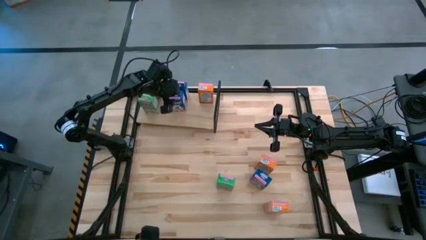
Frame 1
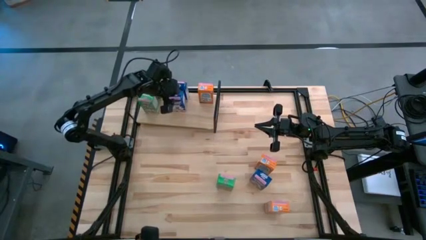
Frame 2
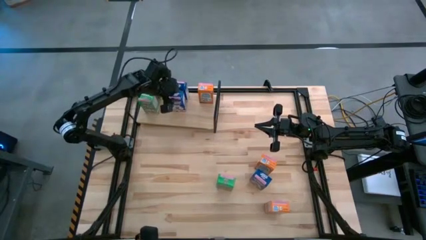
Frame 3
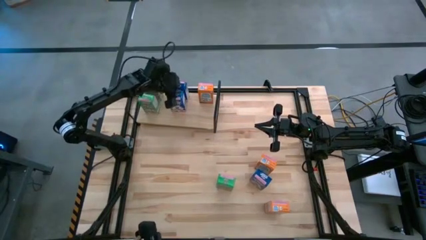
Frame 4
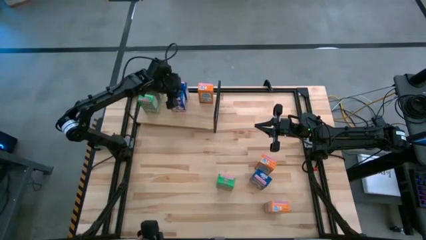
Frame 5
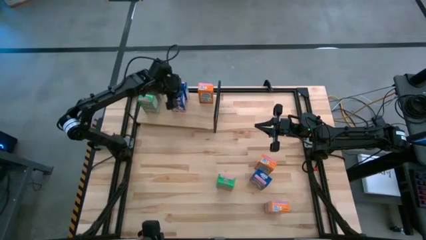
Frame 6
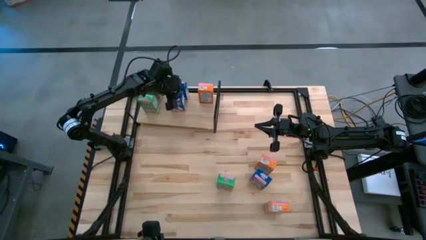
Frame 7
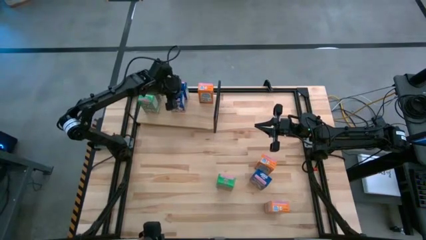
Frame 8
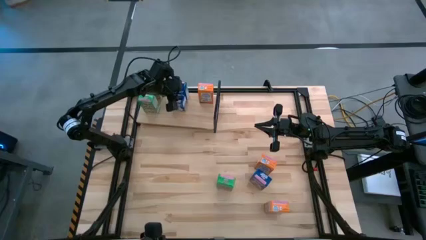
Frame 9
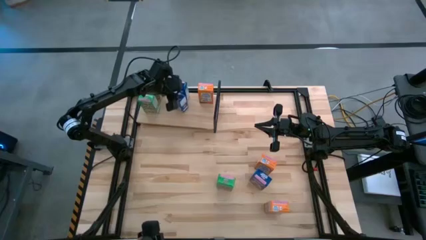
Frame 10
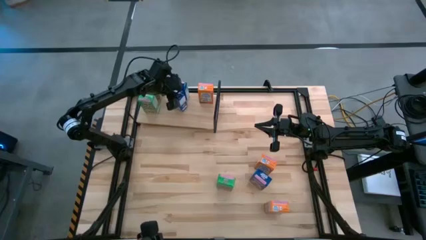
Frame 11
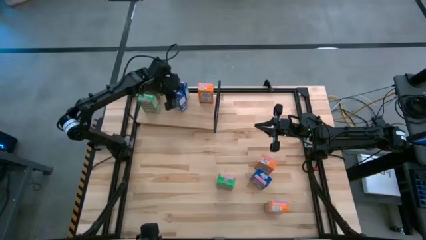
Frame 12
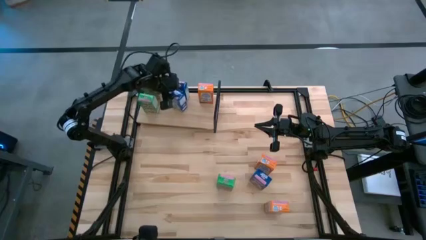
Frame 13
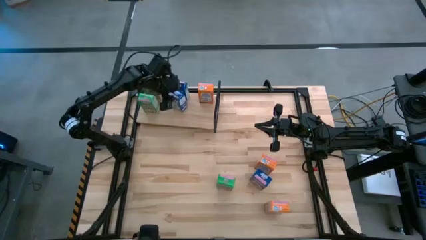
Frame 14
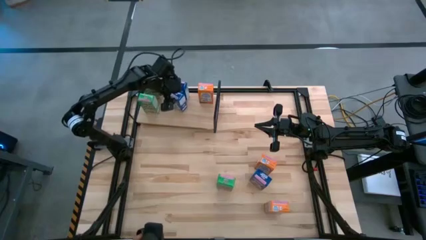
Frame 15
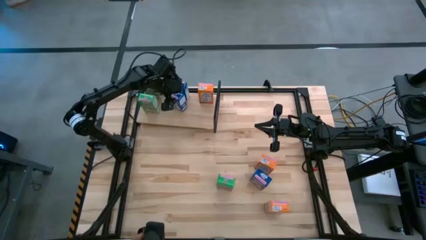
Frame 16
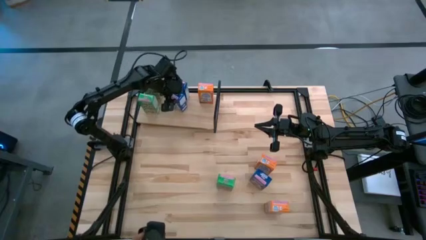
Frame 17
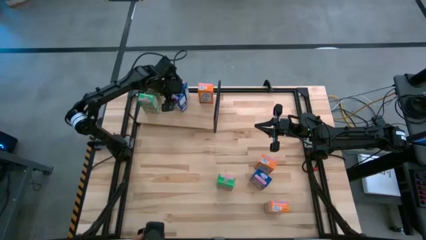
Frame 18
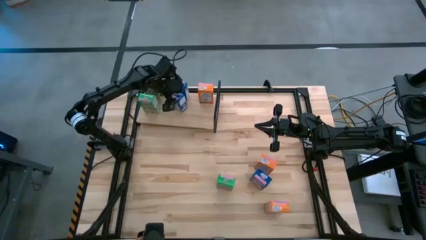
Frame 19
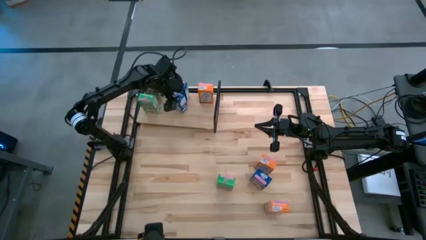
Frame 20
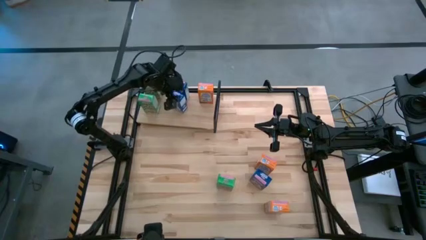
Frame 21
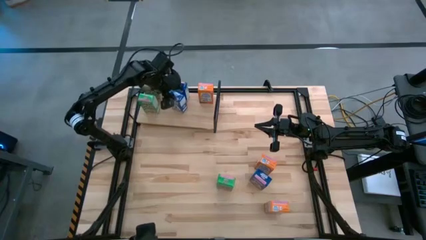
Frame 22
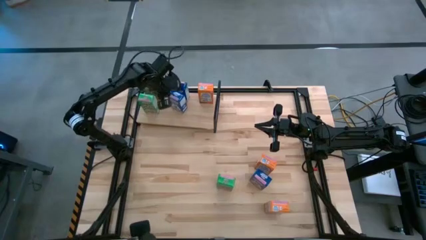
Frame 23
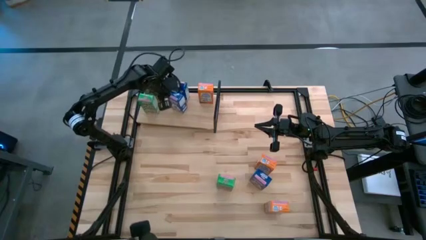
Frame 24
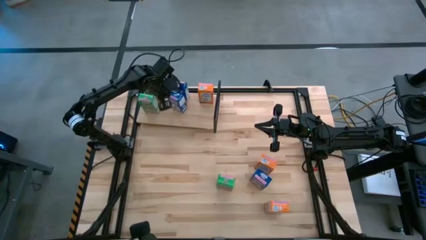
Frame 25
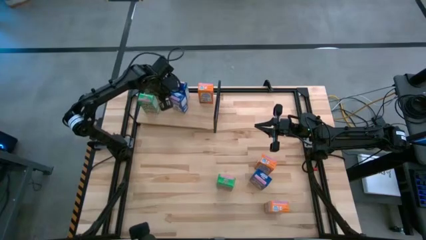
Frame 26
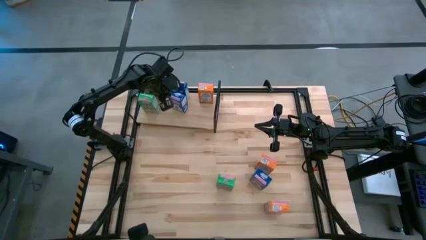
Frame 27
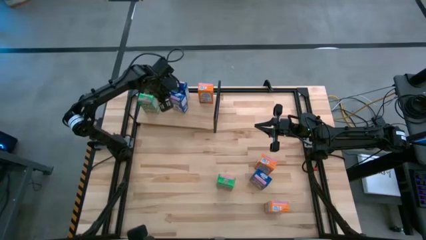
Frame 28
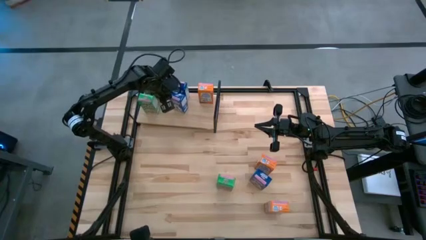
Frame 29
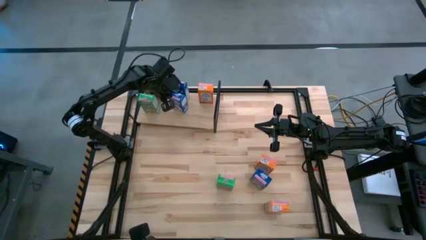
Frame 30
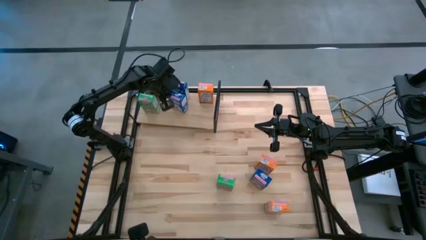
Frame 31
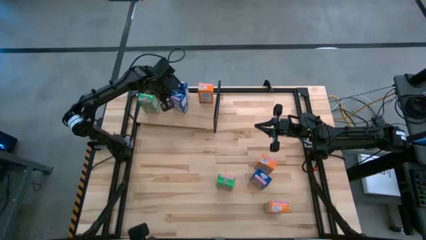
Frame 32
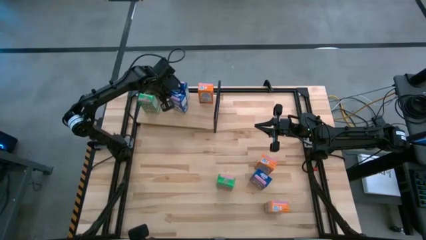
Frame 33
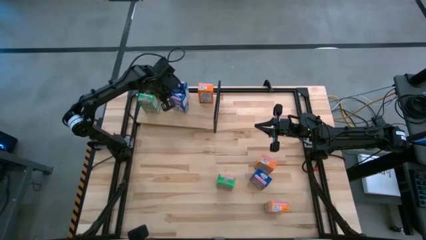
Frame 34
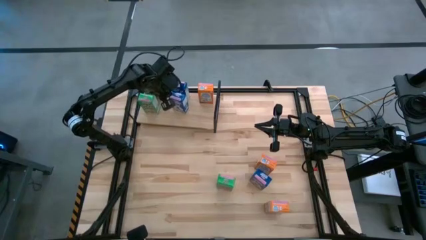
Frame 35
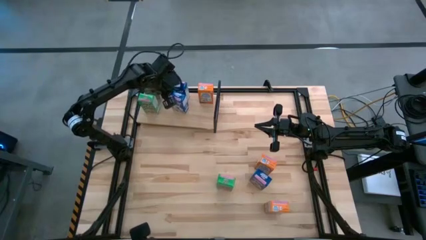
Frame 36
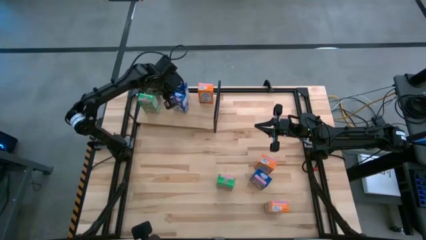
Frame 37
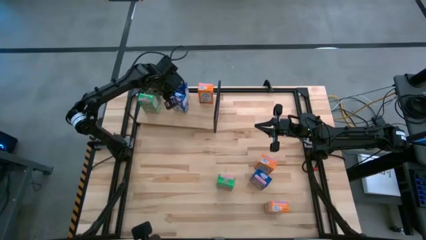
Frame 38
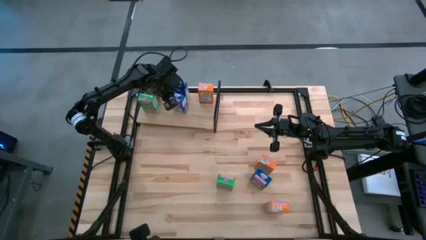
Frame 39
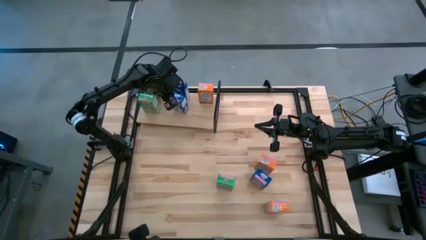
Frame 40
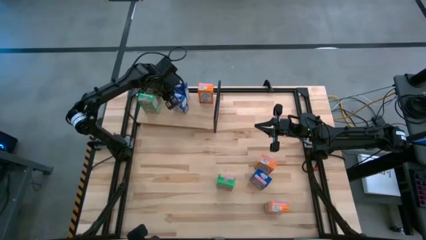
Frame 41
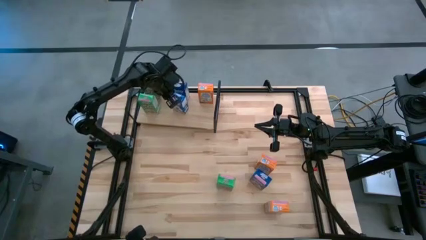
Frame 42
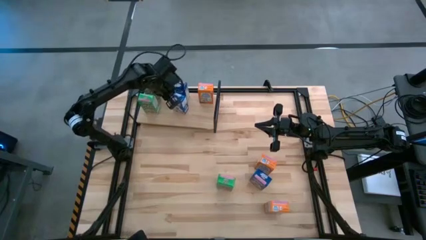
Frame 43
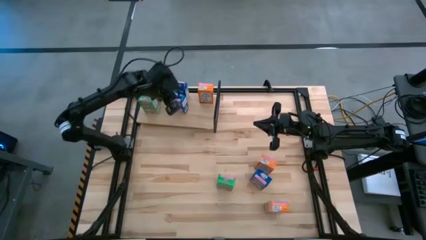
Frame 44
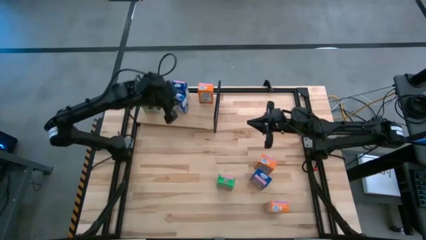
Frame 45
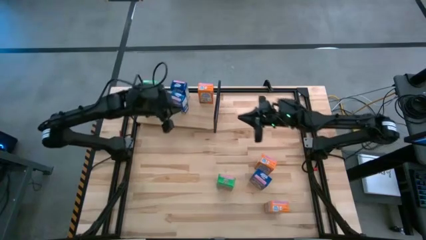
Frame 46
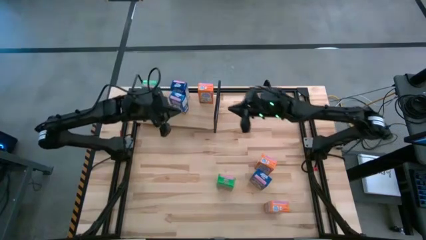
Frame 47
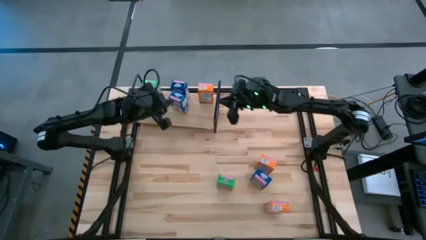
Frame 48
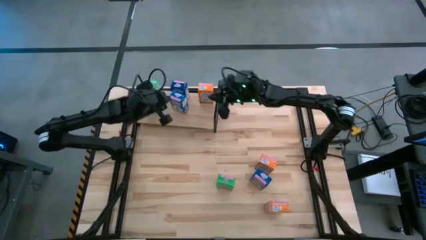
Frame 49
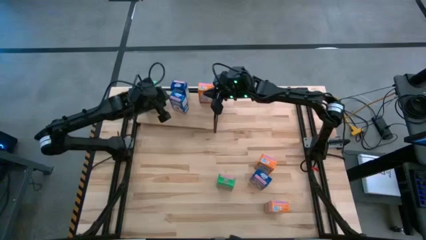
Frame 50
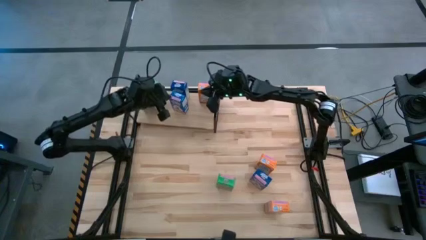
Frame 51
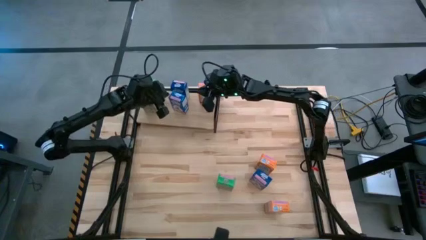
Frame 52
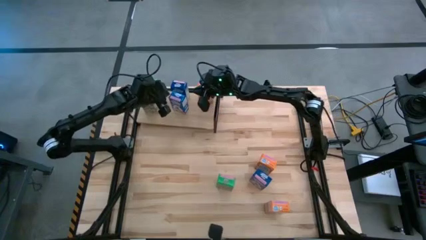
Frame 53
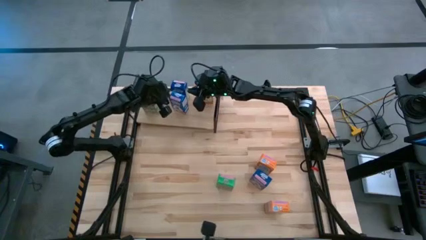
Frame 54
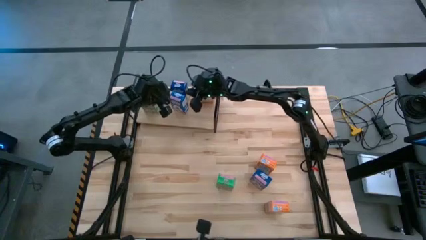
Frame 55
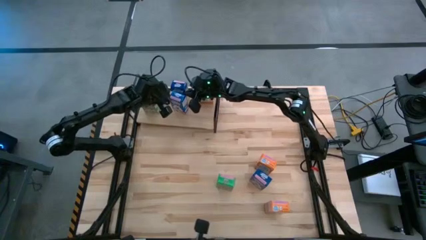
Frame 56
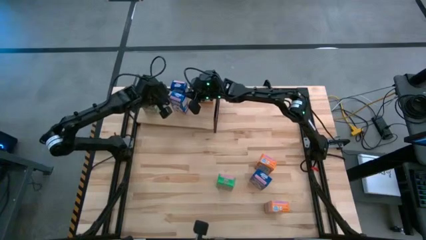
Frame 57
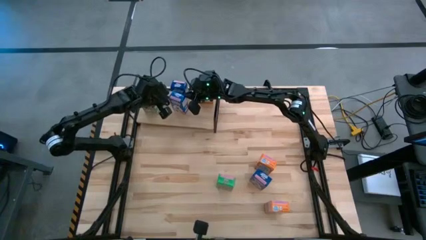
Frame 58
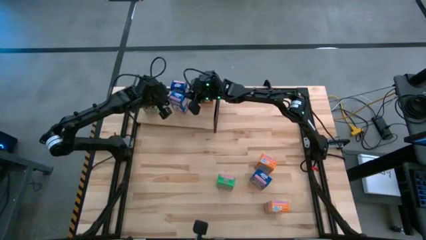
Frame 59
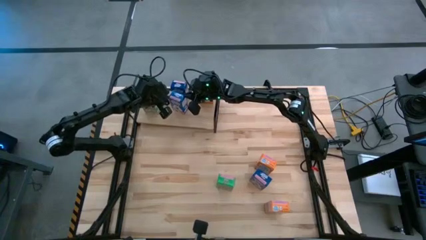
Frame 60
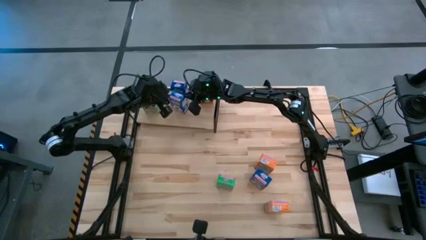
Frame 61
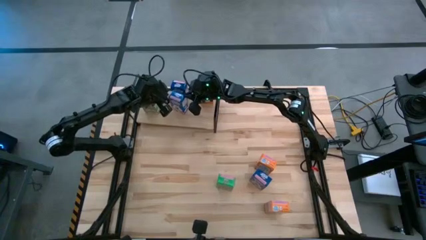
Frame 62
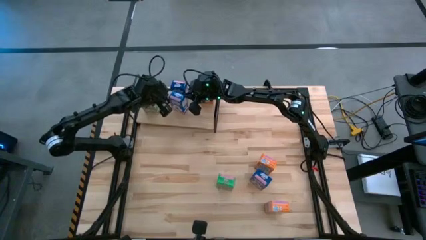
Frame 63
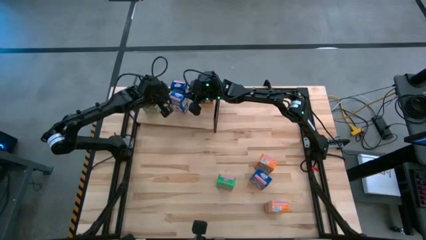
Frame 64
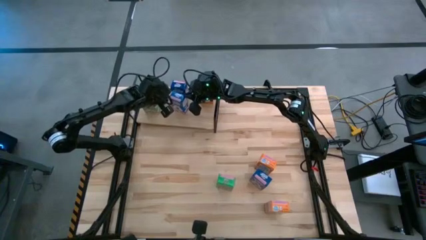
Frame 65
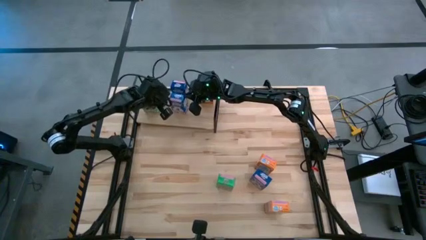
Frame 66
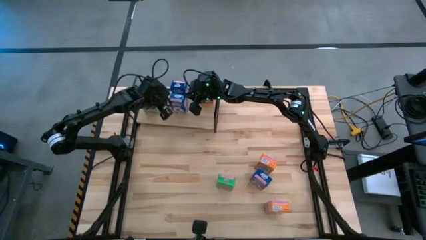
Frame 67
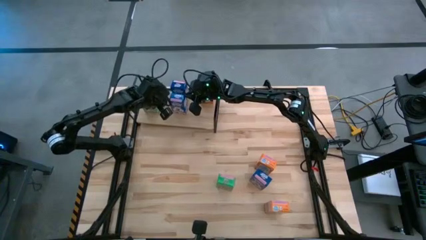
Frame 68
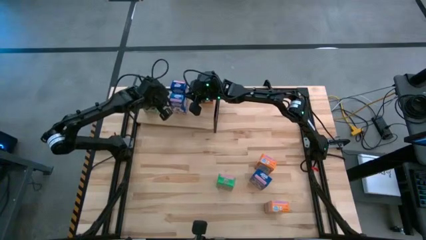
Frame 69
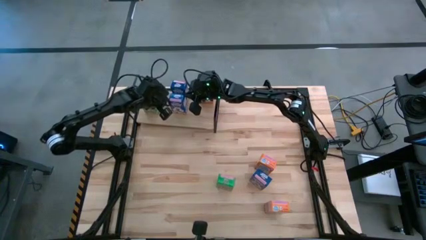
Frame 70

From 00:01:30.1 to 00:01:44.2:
Task: Stack cereal on shelf
Put the top blue cereal box on the shelf aligned with the blue cereal box
